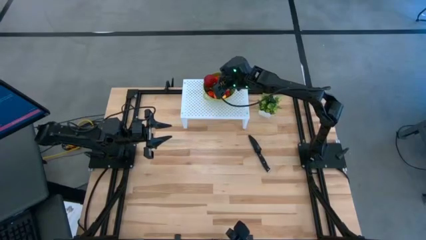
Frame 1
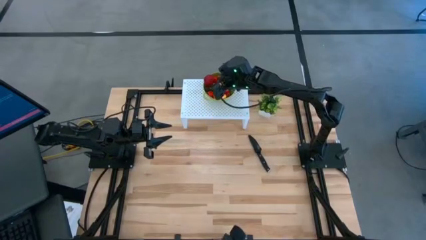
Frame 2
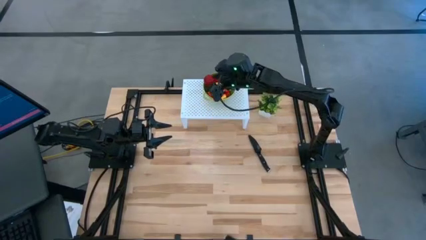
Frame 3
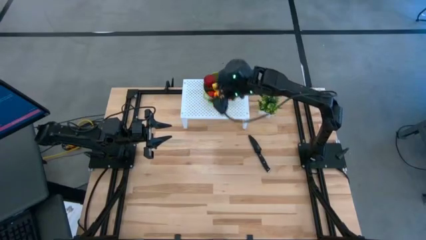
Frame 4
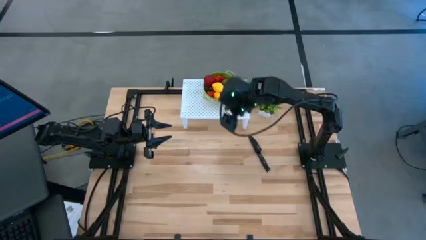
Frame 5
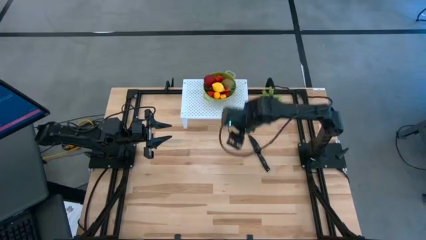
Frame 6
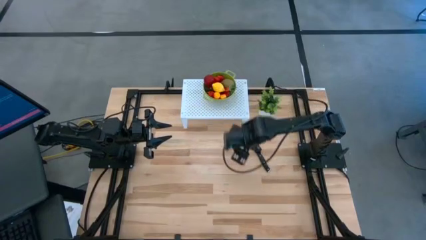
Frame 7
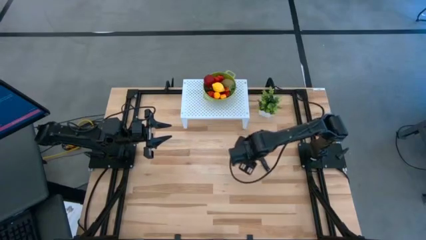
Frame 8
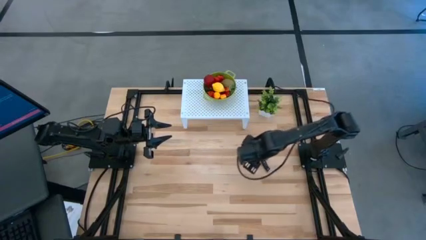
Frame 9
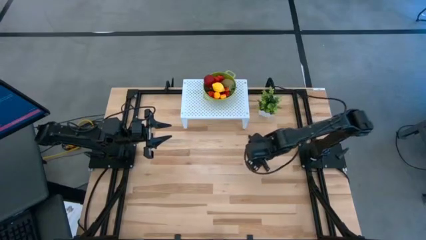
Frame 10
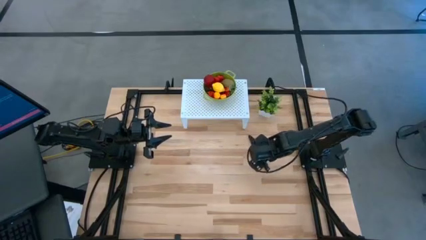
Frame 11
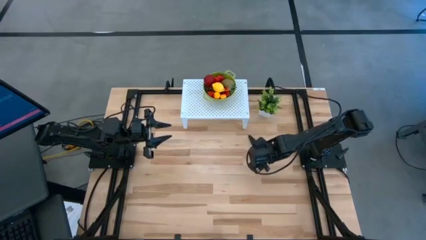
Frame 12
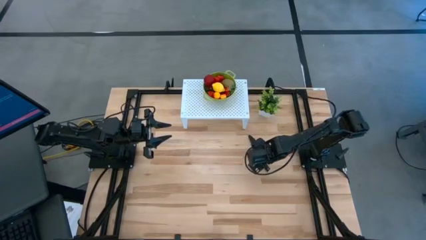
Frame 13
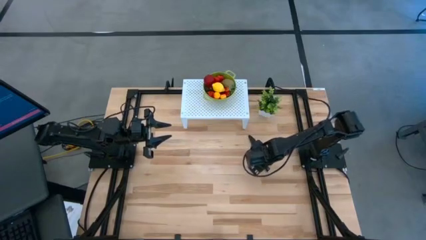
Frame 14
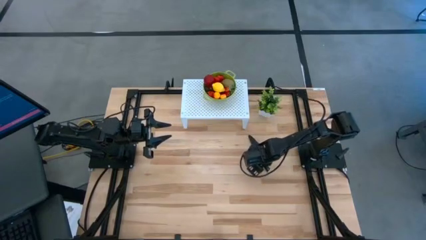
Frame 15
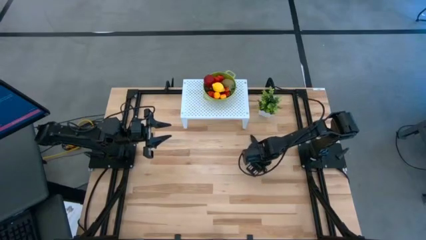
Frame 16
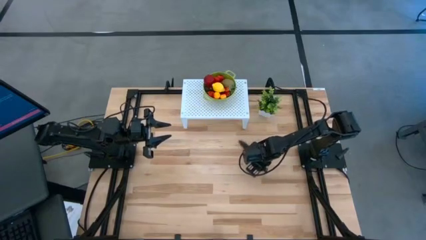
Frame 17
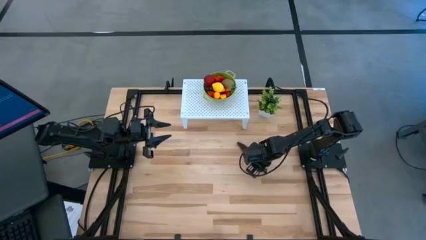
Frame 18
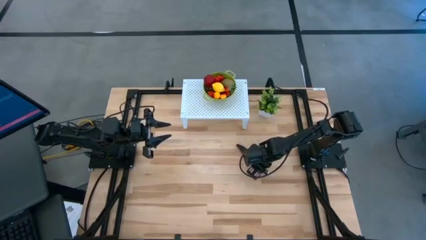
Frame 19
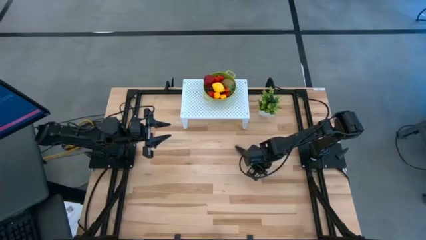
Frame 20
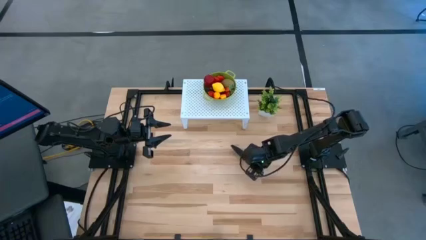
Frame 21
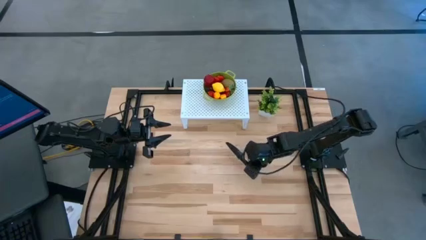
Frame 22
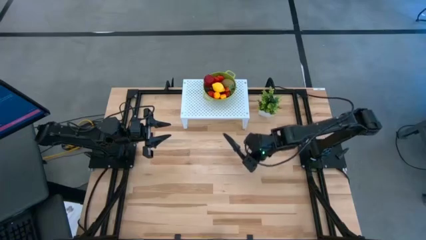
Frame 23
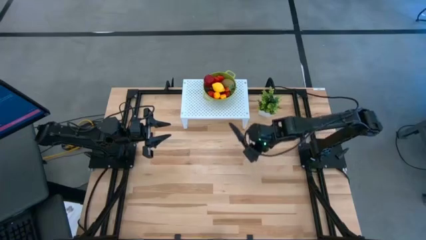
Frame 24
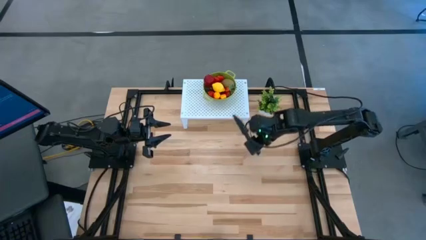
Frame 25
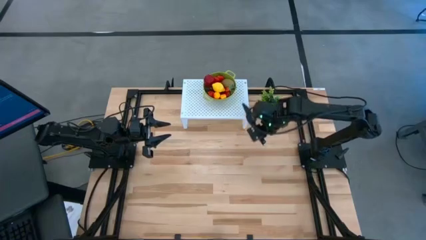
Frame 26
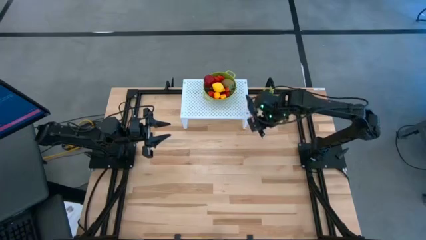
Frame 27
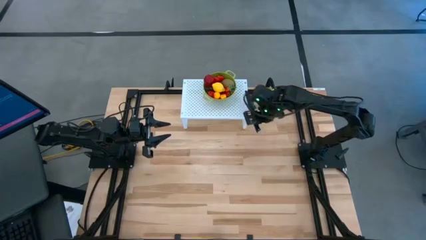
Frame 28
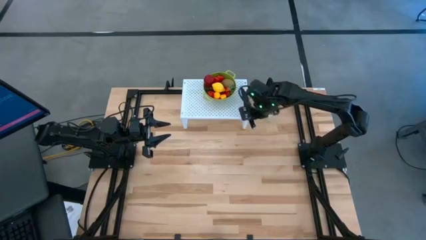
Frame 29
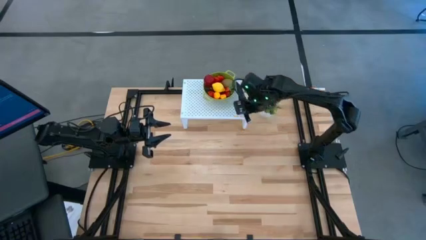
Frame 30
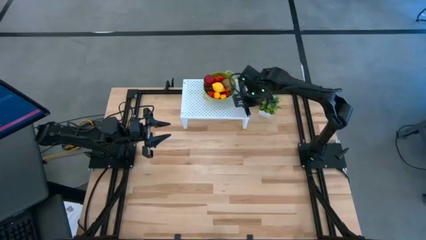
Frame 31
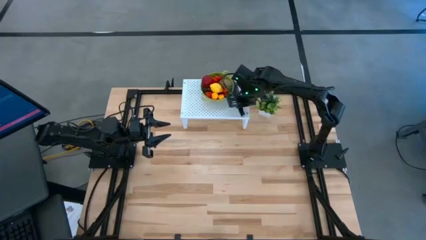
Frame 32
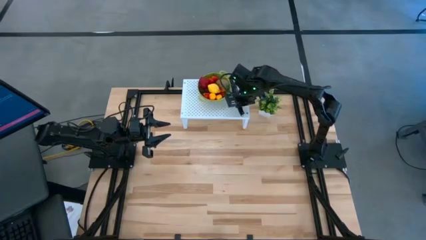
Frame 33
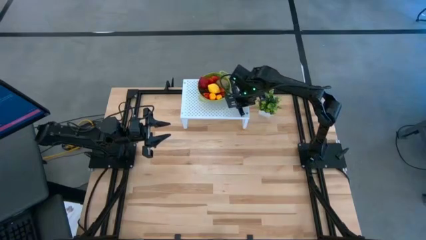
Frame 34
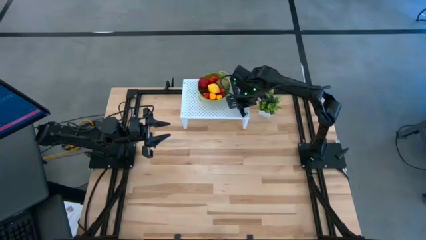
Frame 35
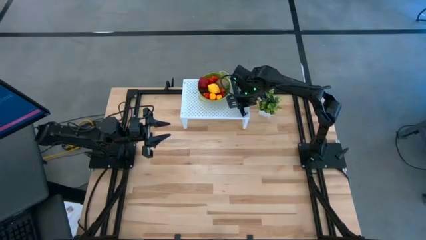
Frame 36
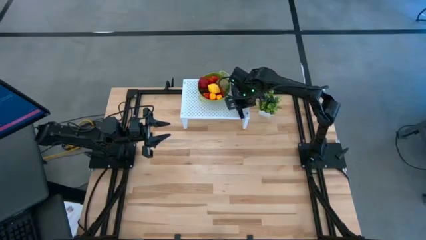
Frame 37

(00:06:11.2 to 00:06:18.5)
Task: Pick & Place Fruit
Put the black knife on the shelf to the right of the green strainer bowl

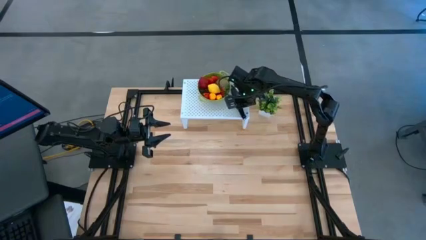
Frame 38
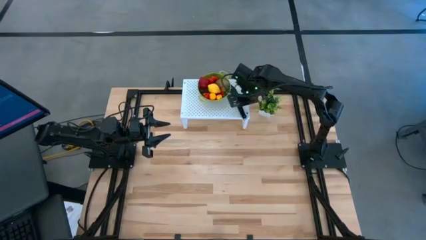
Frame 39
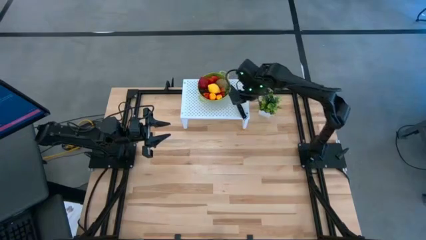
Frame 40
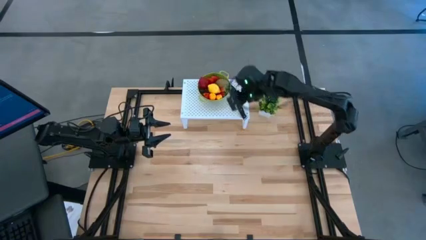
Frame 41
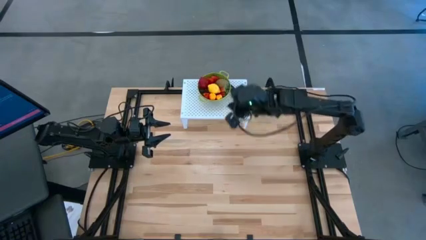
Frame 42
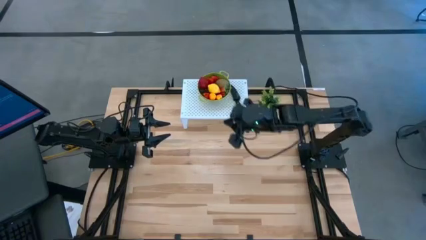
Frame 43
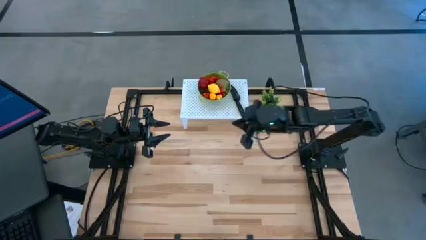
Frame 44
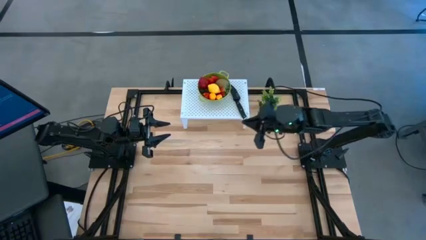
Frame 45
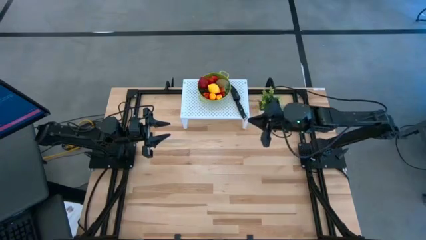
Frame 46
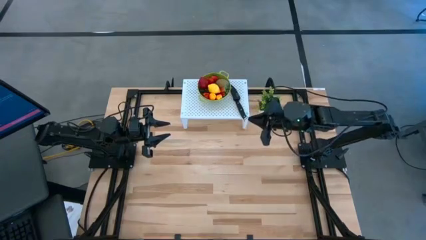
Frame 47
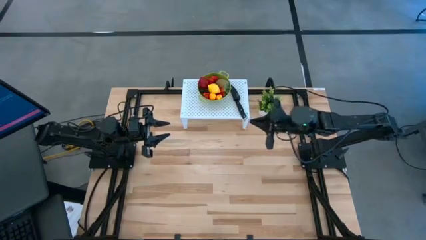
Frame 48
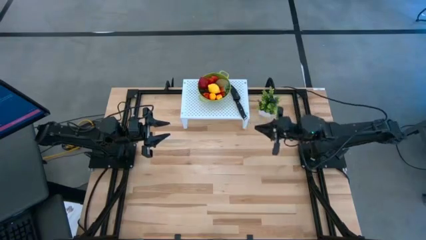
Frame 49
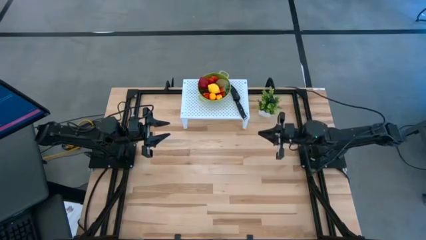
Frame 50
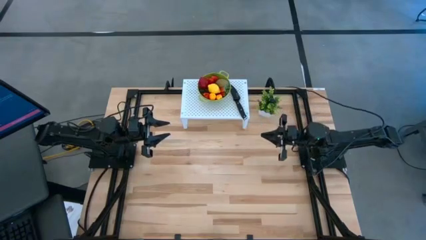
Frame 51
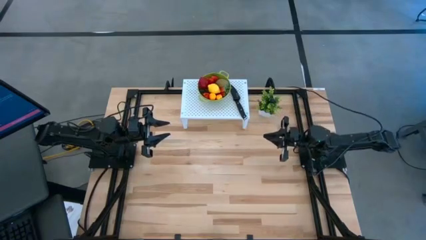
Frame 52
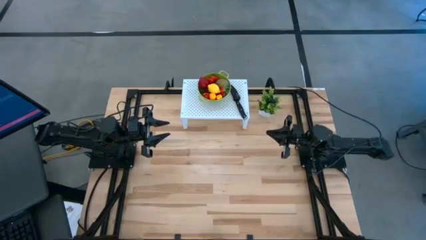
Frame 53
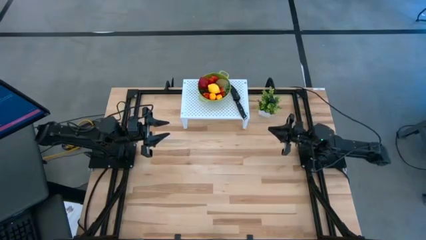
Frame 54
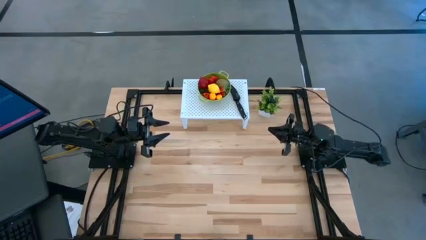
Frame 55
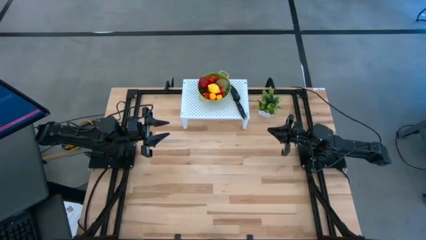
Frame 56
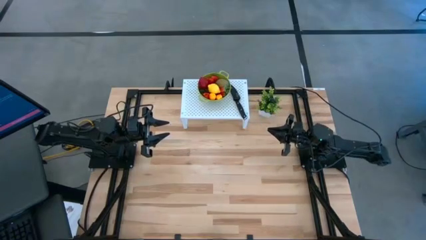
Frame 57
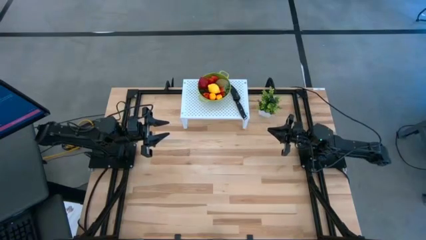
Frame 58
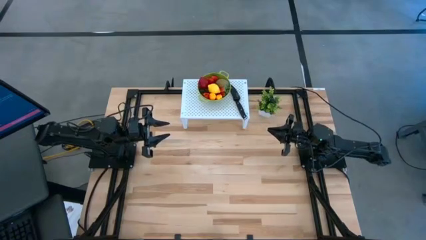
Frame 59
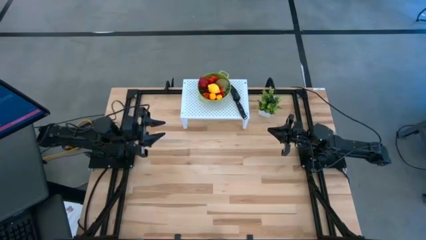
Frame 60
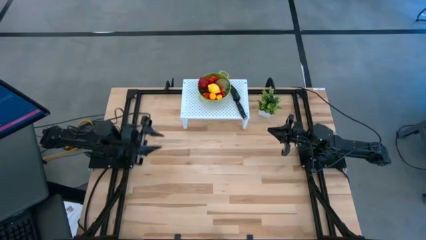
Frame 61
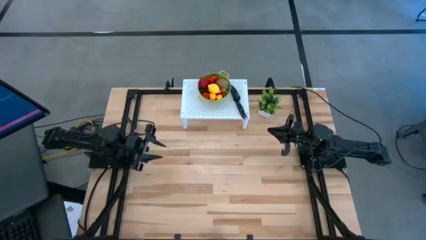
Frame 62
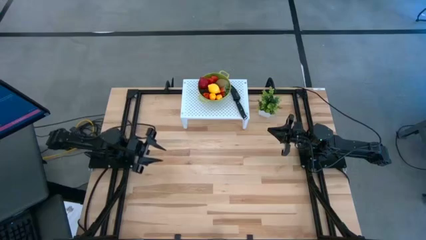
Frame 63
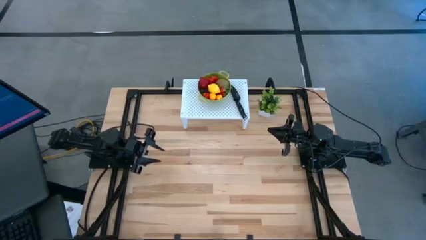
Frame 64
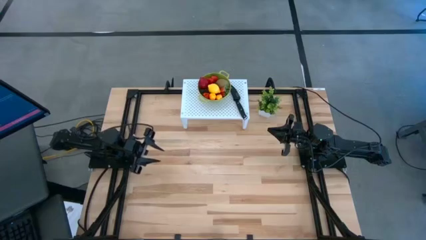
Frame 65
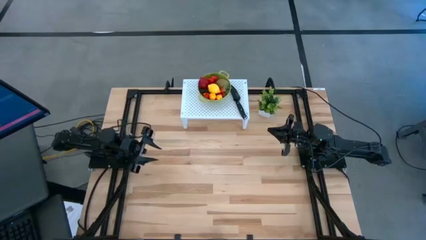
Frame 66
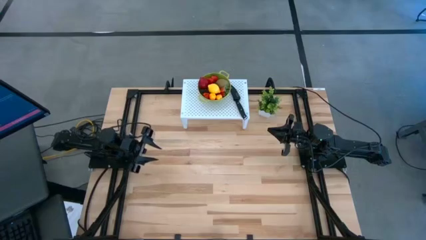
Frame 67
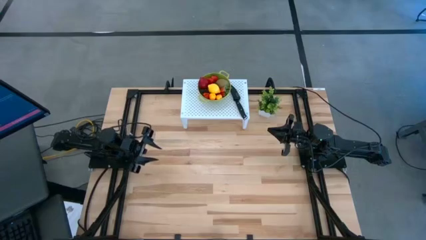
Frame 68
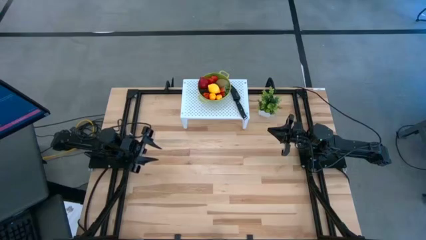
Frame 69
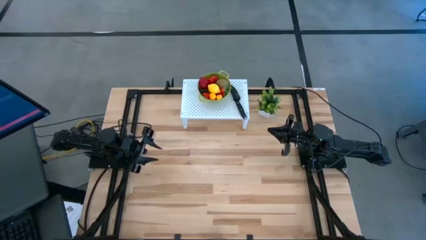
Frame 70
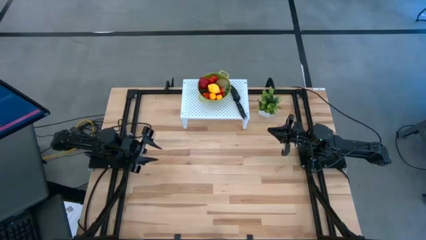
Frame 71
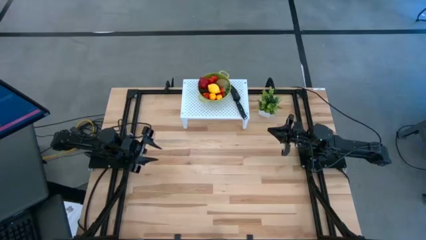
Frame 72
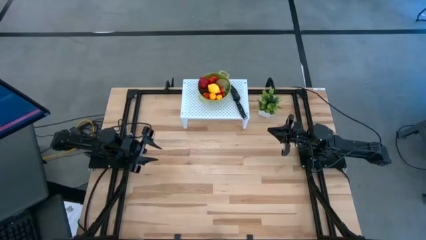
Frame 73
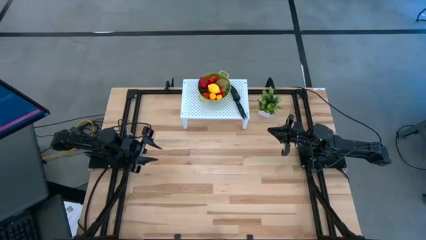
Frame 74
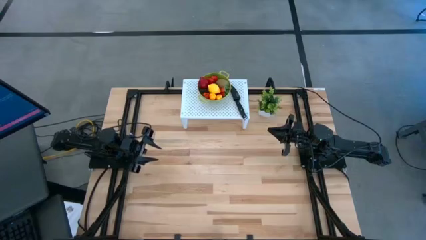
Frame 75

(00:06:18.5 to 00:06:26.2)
Return to Home Position

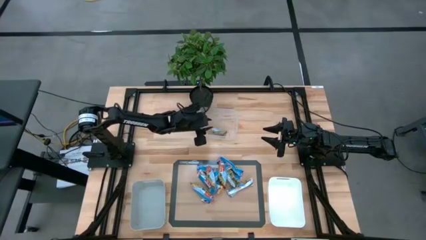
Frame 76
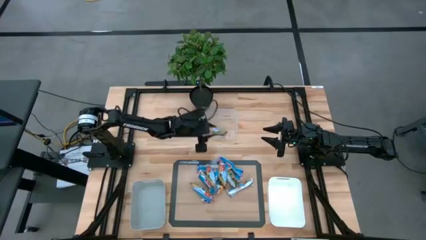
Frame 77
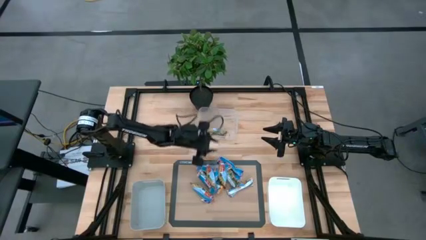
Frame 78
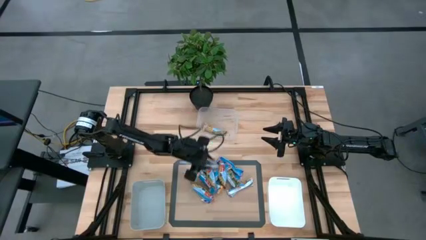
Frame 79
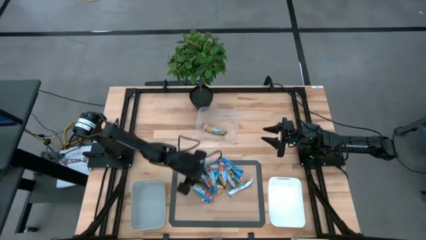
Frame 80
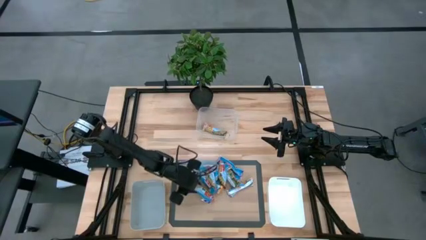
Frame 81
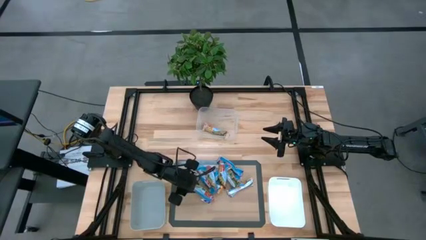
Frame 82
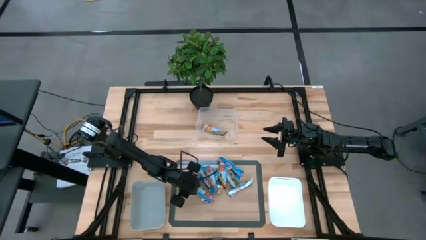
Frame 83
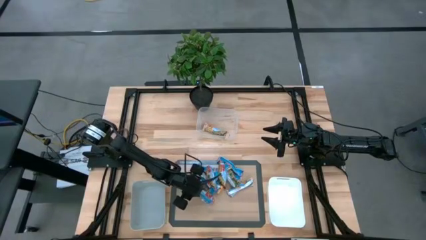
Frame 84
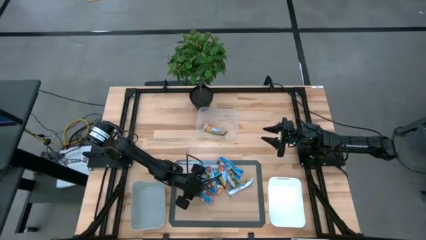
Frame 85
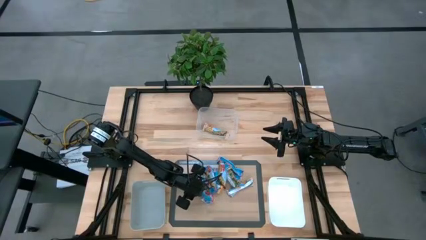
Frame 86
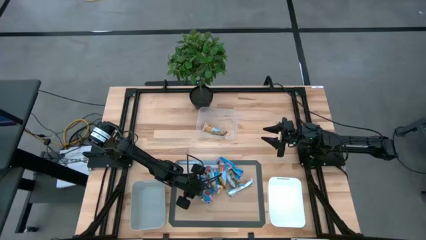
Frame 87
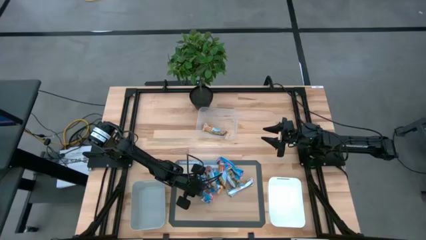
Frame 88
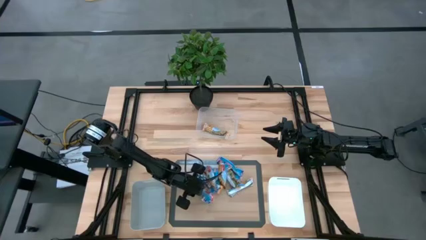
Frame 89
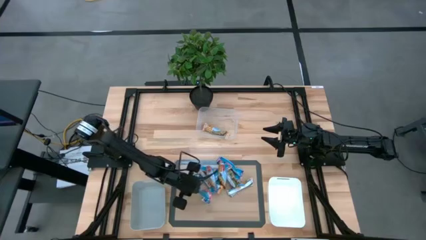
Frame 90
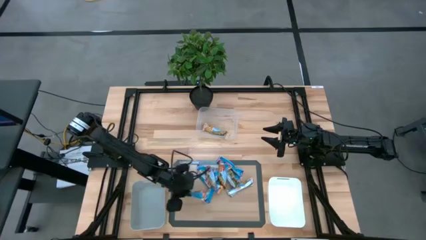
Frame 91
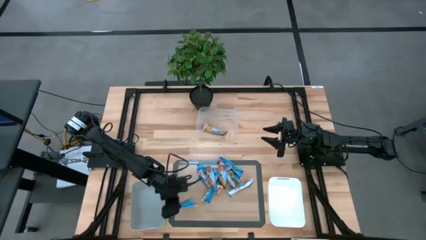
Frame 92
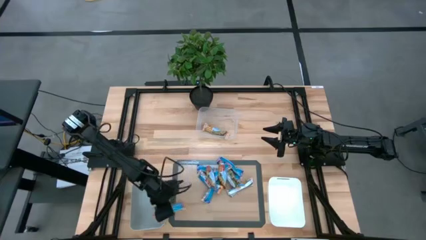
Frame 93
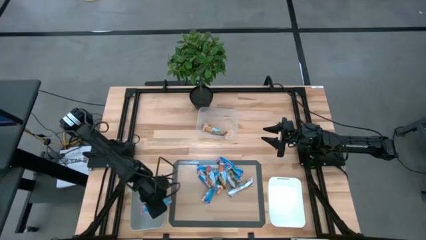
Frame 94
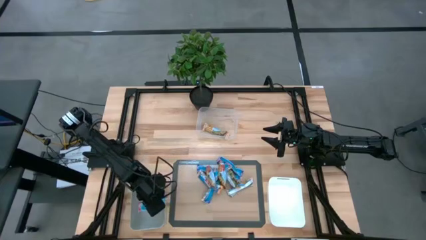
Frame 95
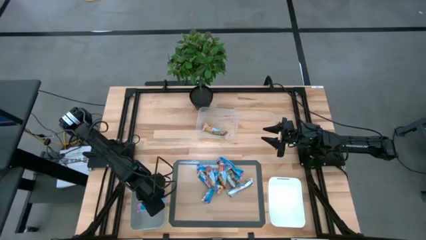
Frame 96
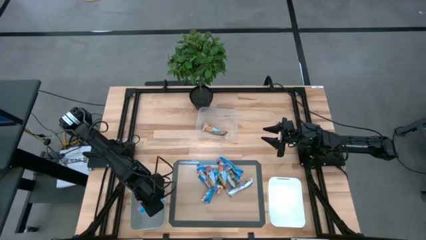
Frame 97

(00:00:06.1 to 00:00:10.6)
Task: Pick and place Granola Bars by type
Put the red granola bar into the gray bin
